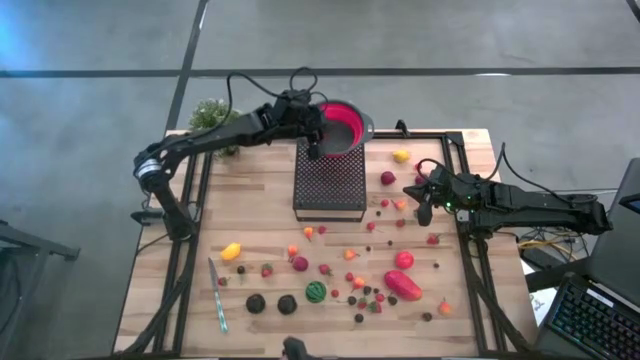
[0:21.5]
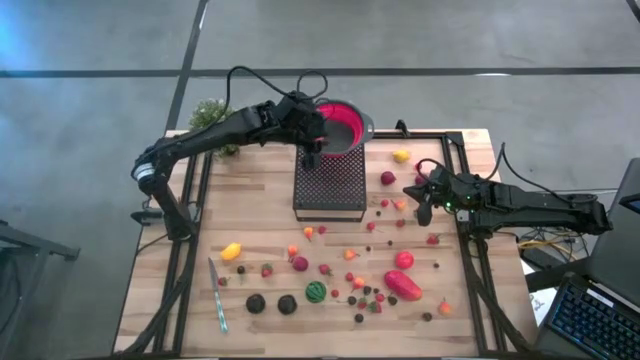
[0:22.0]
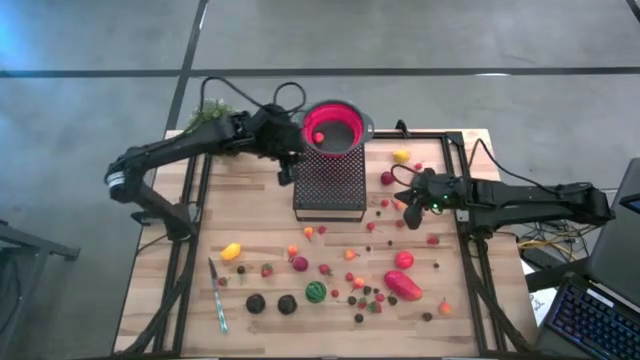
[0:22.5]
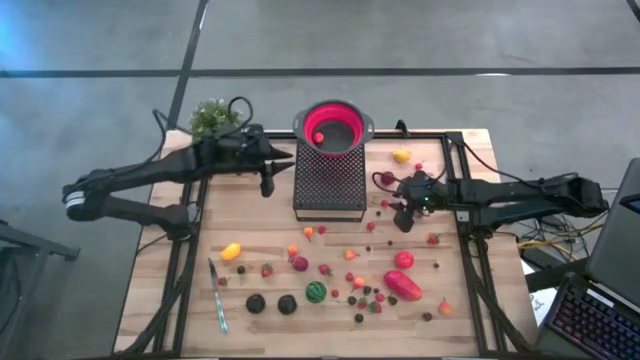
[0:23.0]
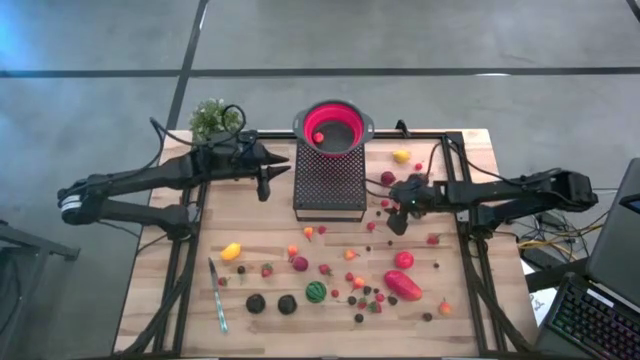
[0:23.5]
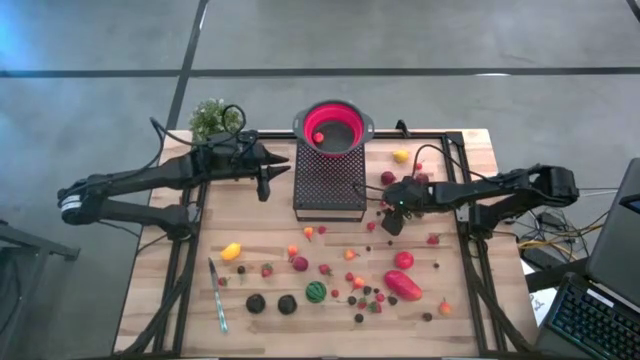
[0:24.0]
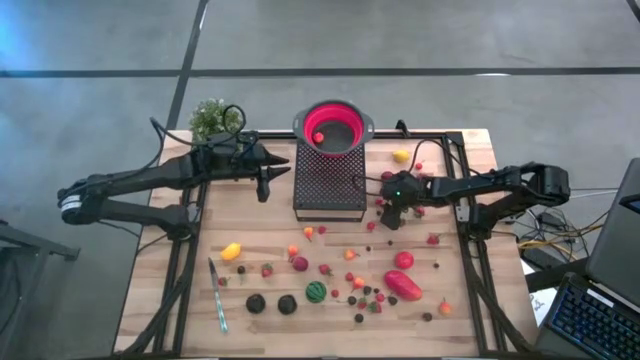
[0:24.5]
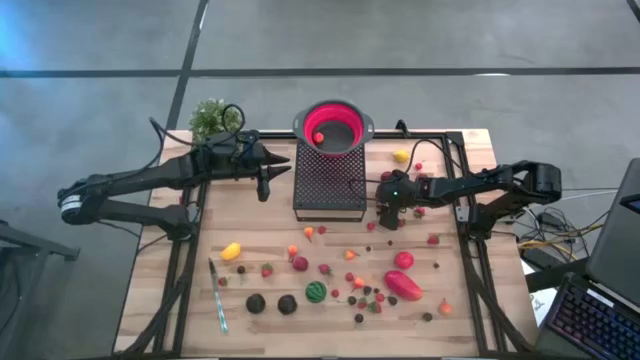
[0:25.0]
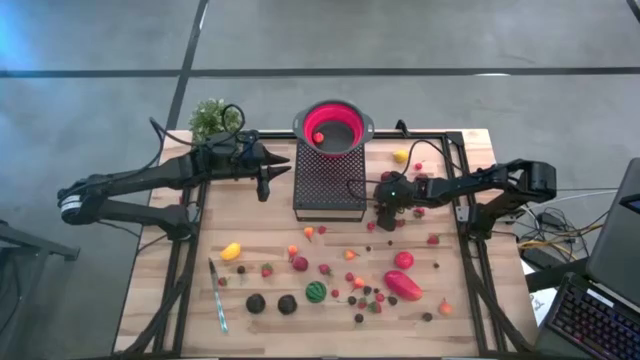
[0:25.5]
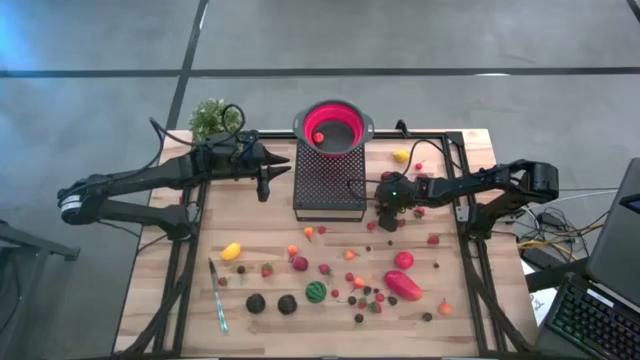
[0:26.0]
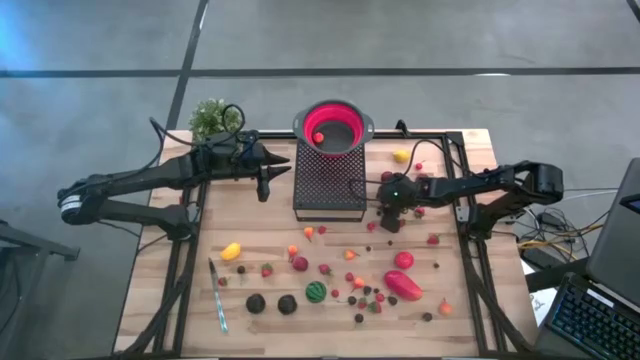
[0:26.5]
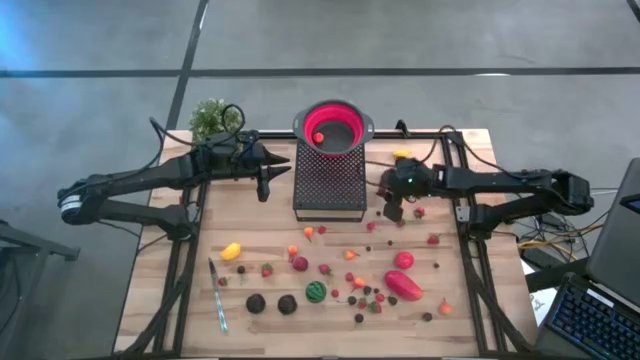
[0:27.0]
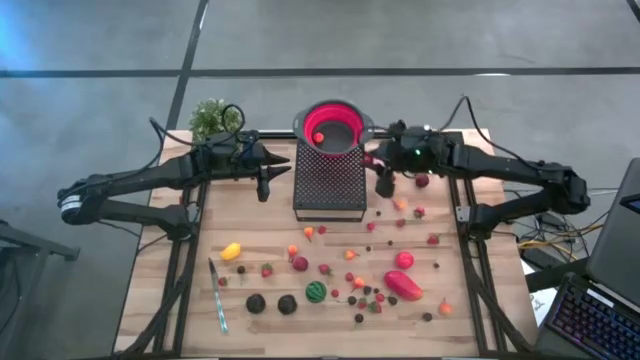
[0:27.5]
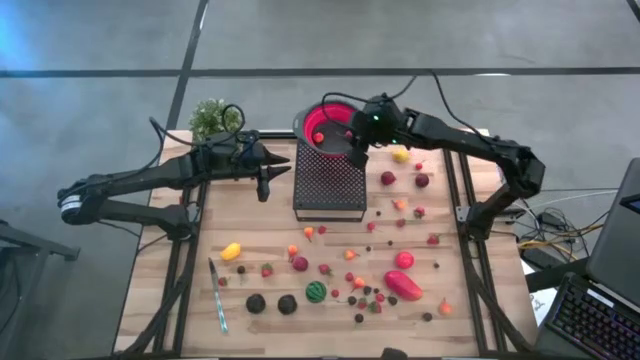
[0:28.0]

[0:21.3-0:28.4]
Task: Pick & Place Fruit
Put the red cherry into the red strainer bowl on the shelf

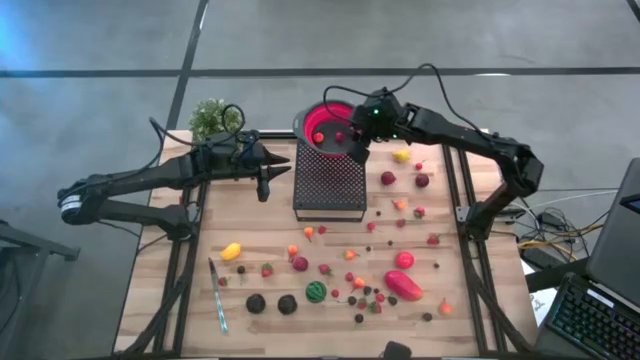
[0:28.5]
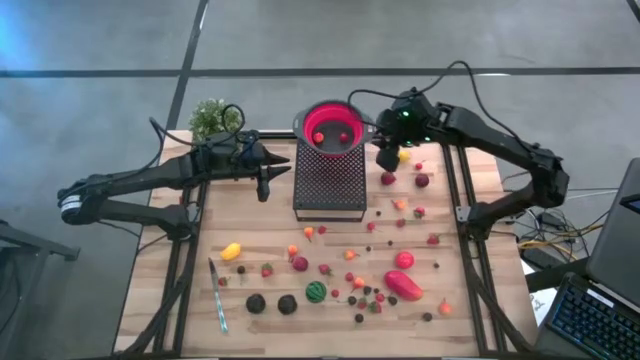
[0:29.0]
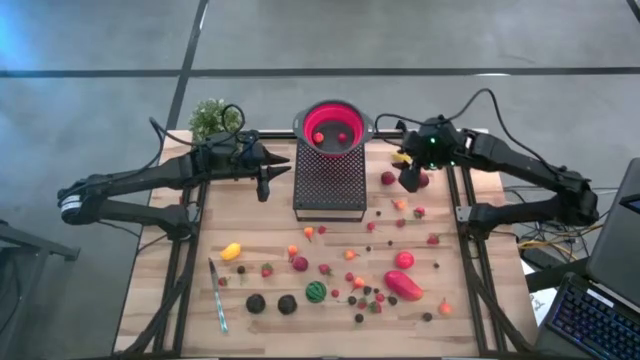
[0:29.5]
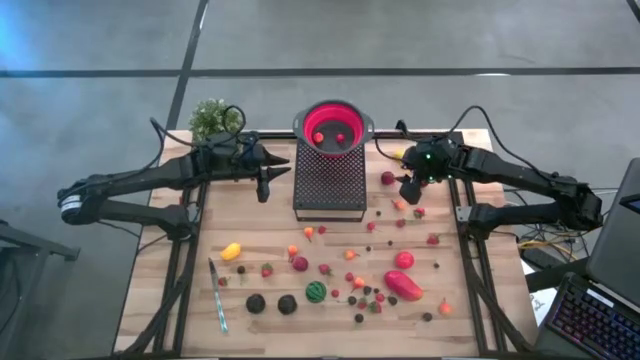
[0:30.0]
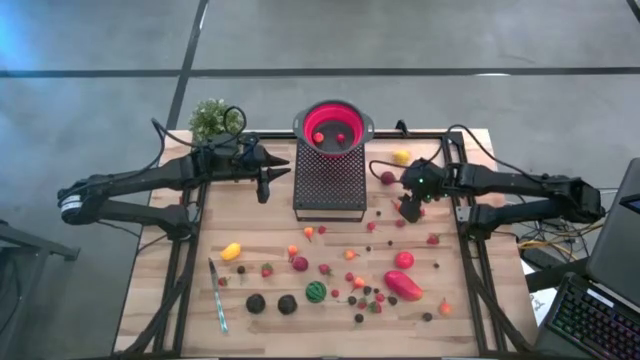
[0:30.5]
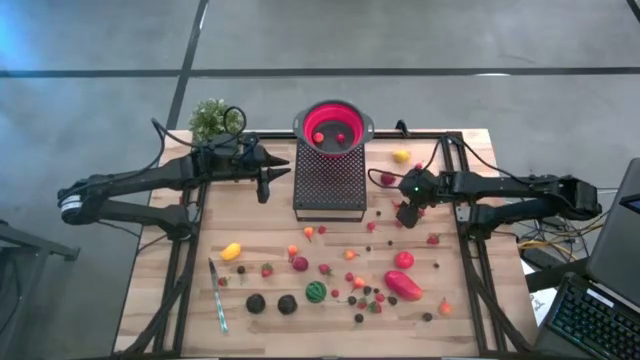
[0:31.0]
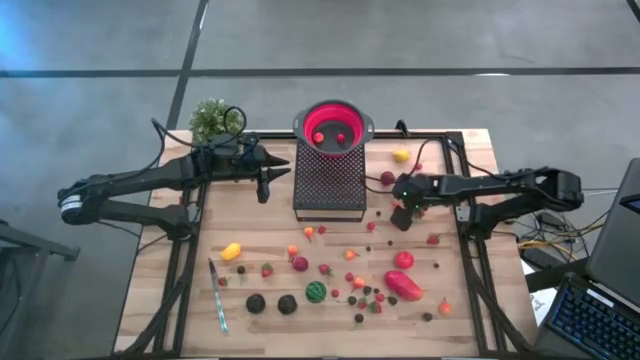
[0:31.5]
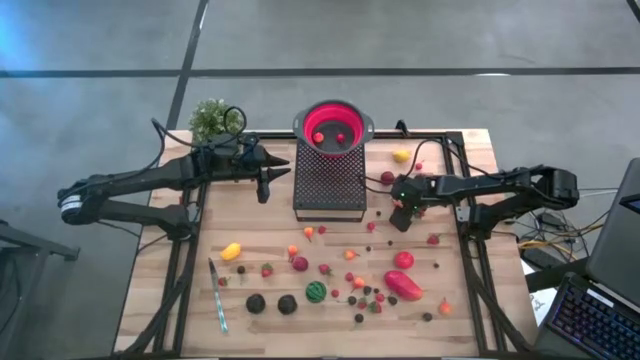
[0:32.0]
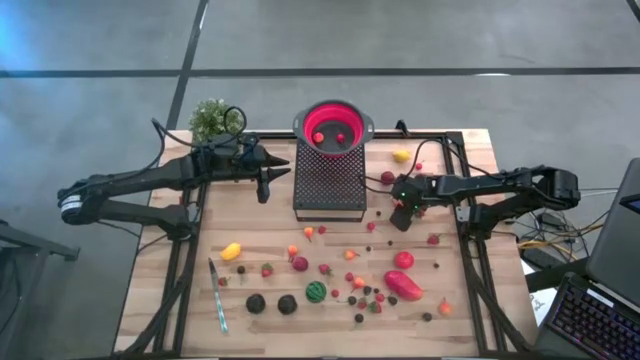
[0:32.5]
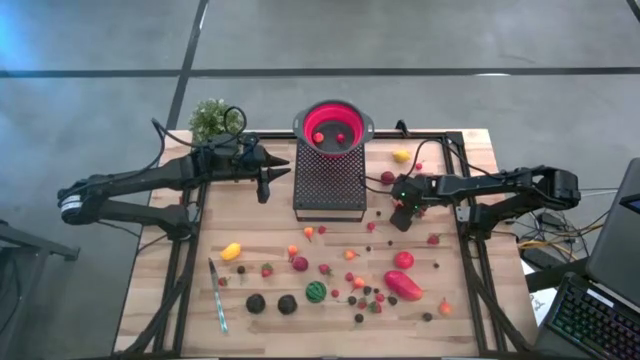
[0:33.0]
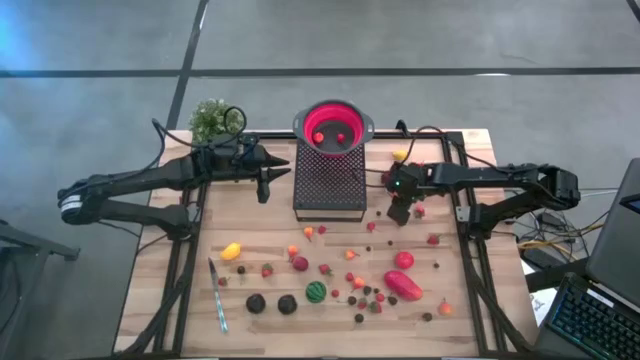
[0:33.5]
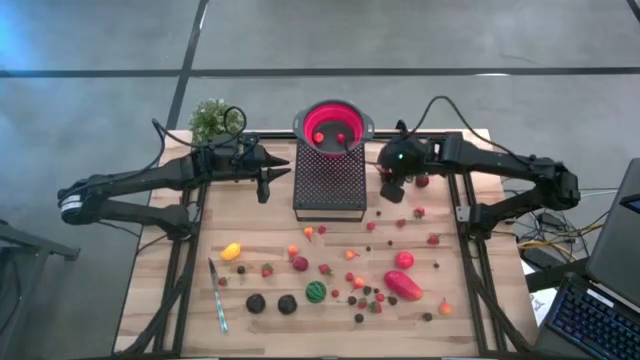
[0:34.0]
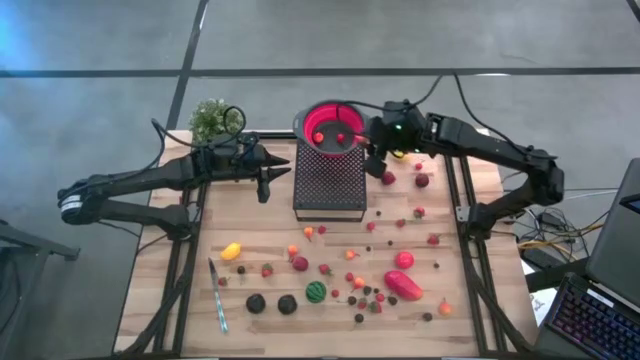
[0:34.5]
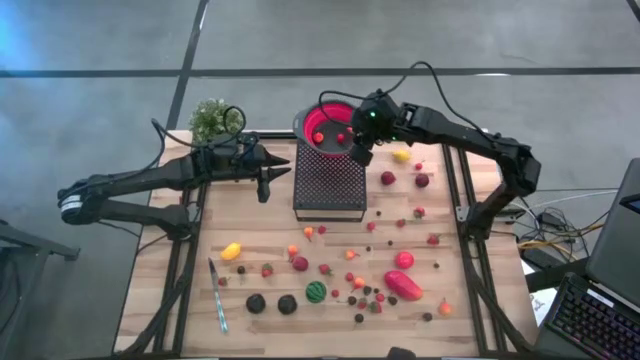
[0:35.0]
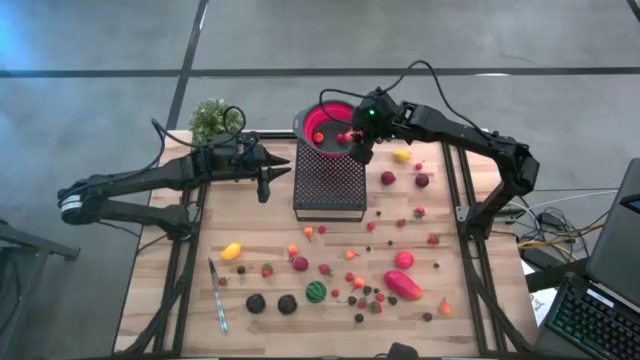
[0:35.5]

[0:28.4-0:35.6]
Put the pear into the red strainer bowl on the shelf

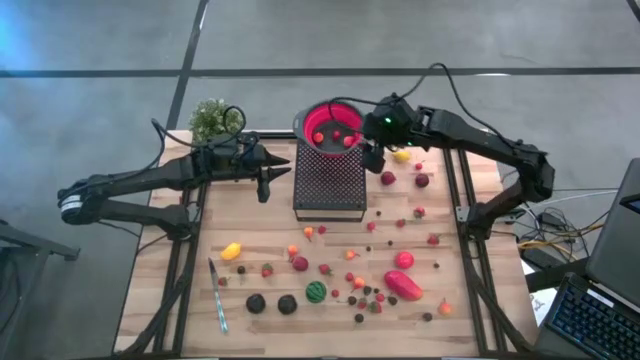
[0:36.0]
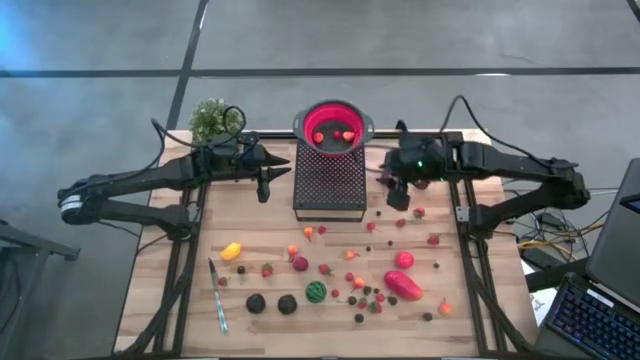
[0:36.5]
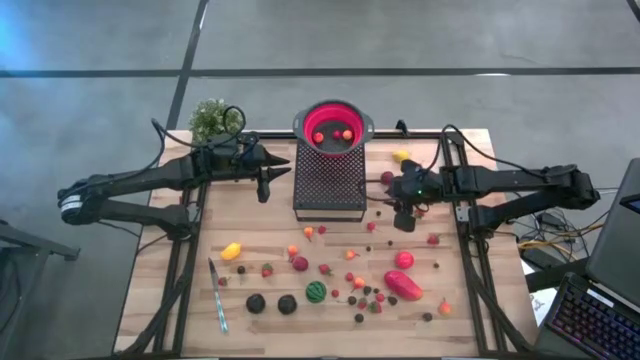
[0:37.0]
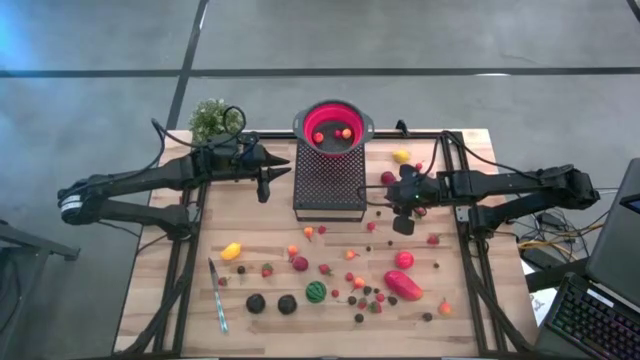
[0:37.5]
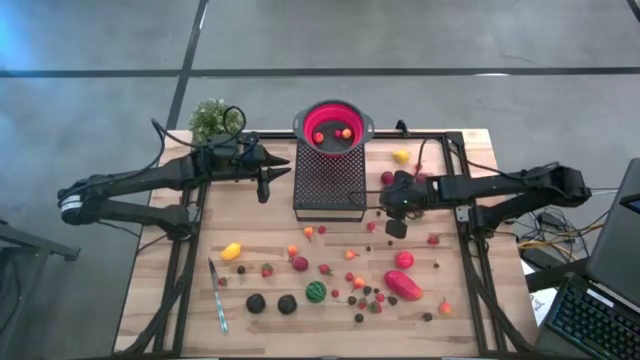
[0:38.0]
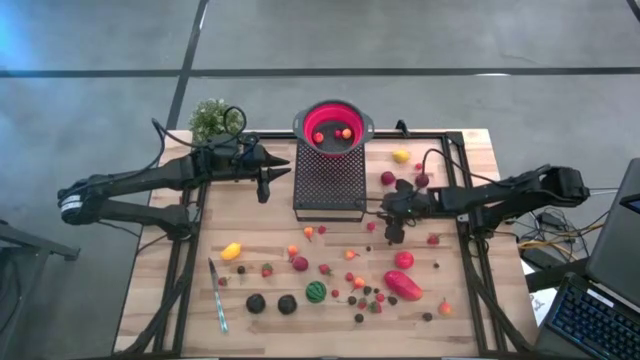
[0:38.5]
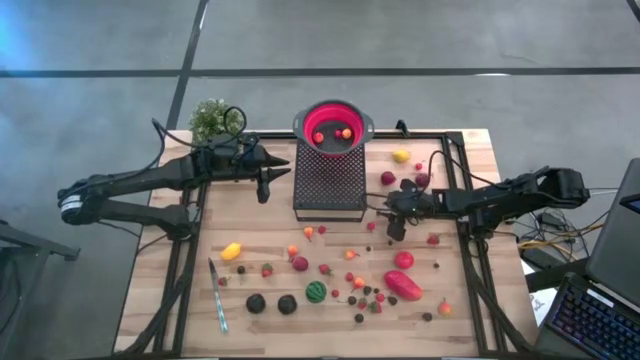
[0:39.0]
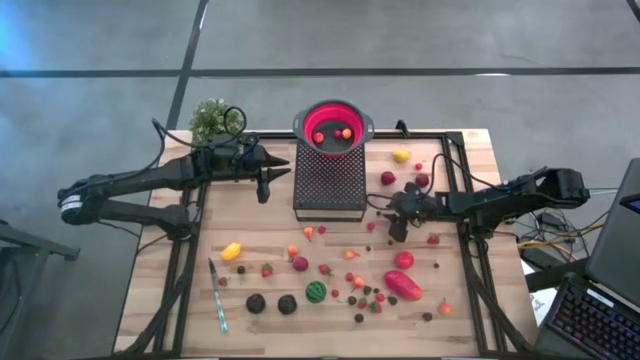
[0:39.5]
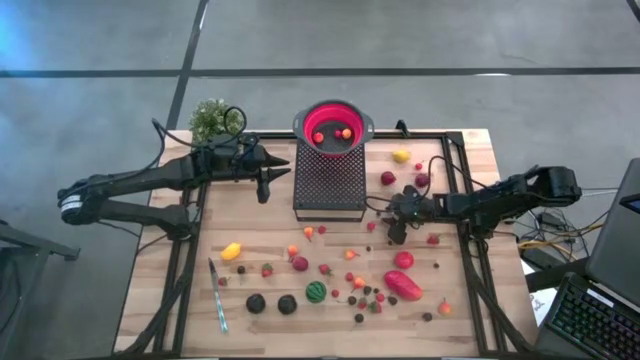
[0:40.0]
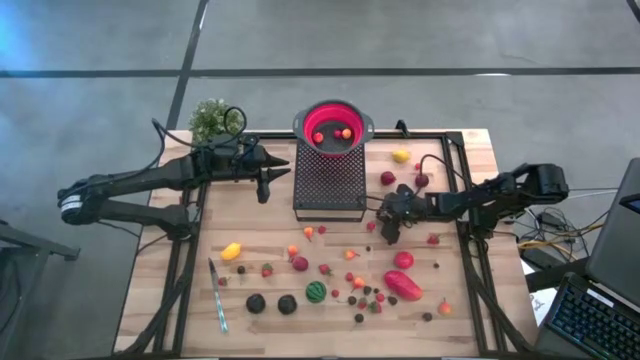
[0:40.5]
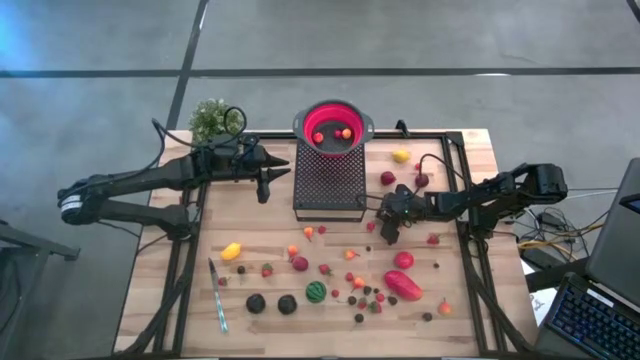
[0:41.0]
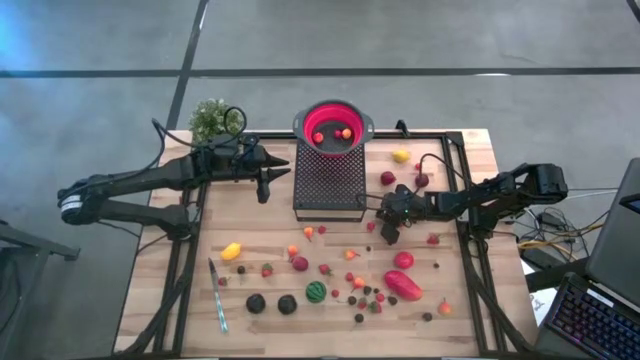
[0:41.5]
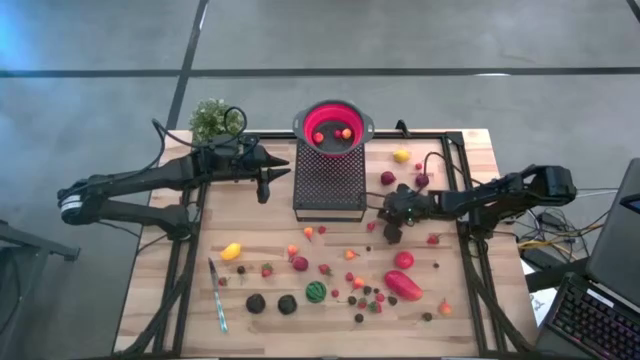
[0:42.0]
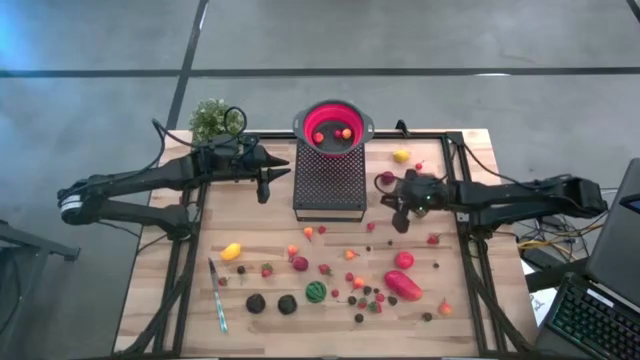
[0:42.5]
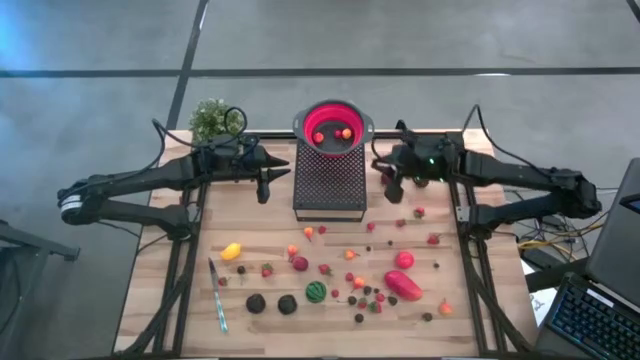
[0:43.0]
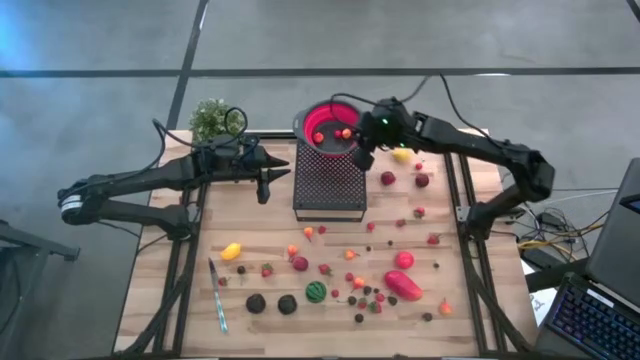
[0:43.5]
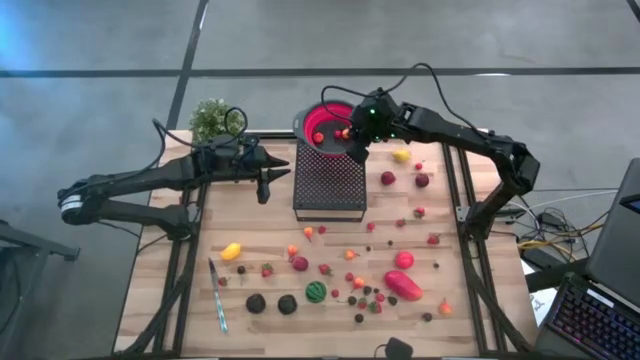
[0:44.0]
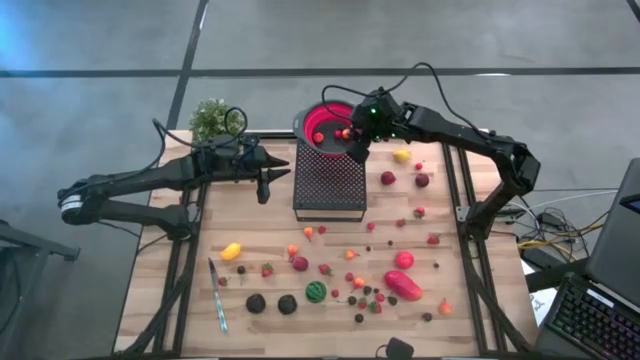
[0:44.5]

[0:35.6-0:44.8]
Put the blueberry into the red strainer bowl on the shelf
